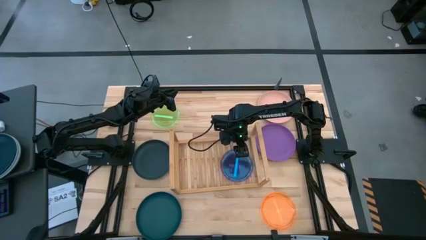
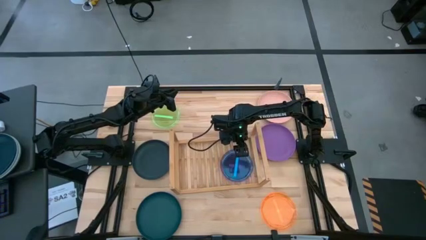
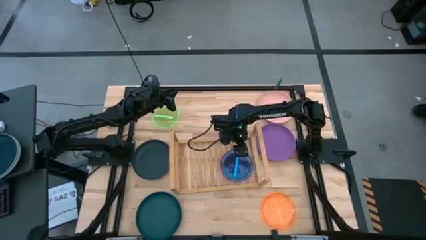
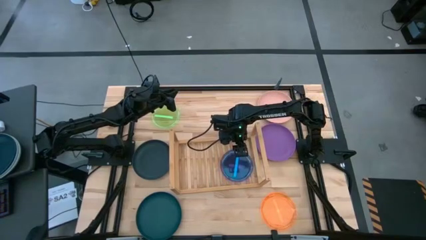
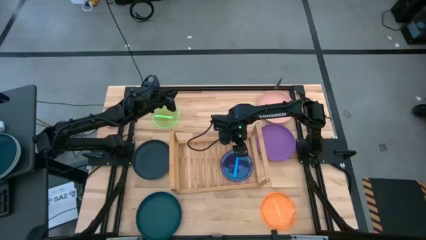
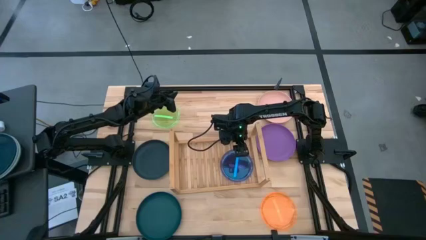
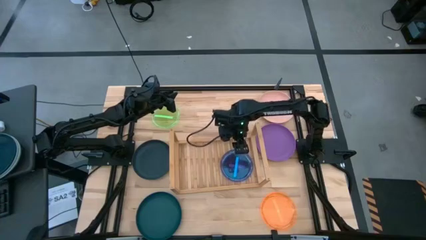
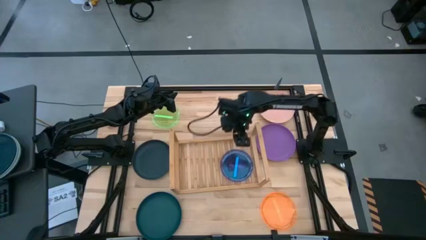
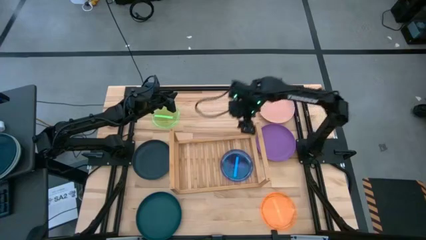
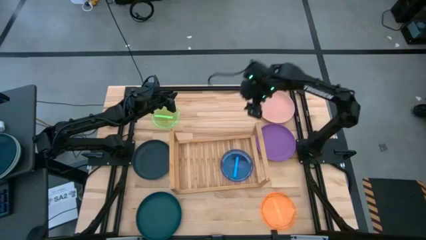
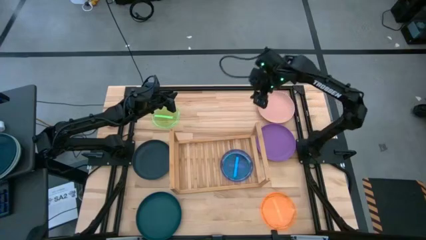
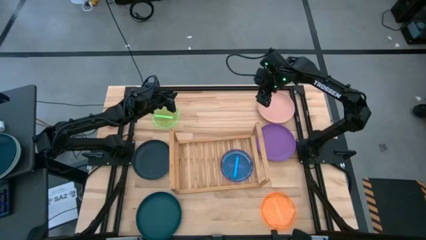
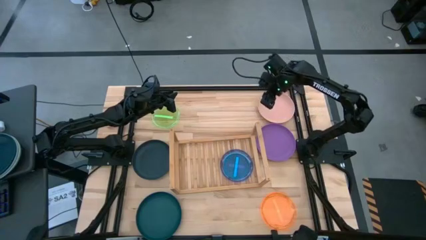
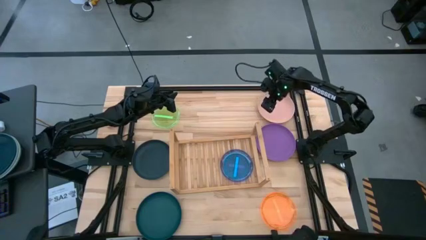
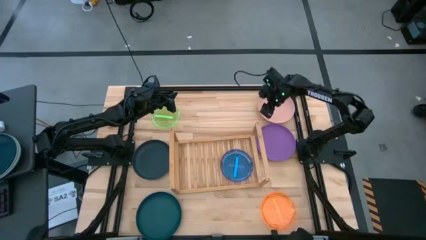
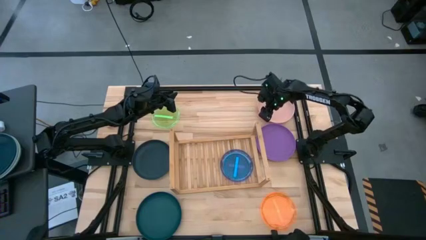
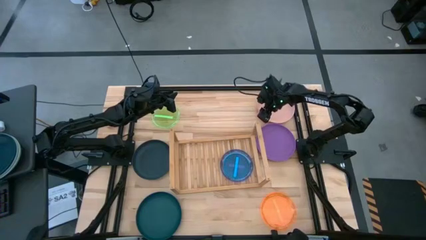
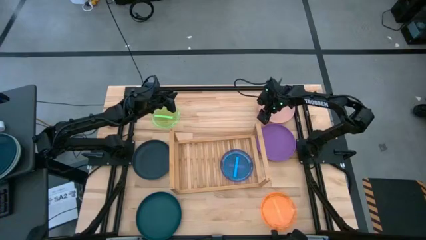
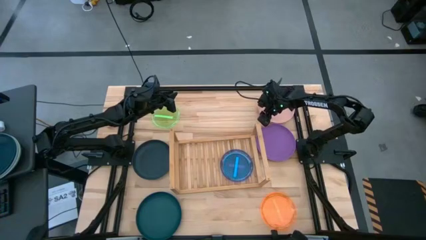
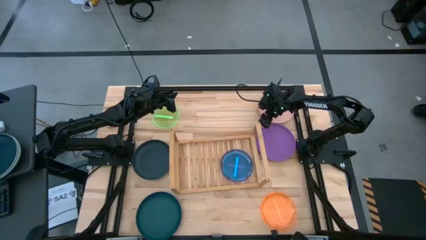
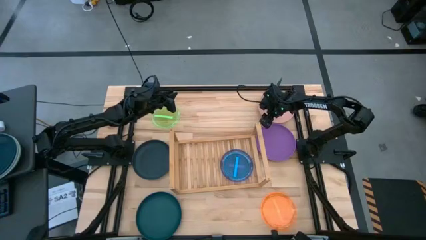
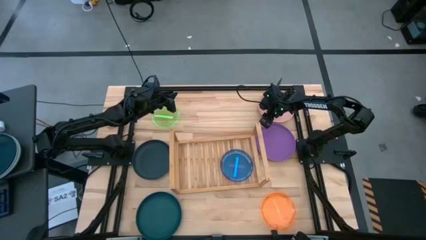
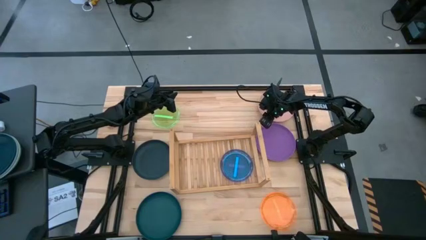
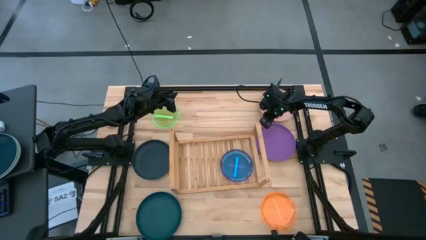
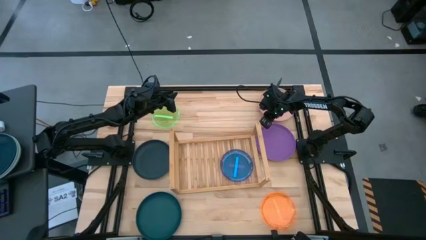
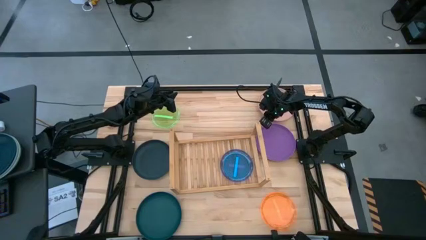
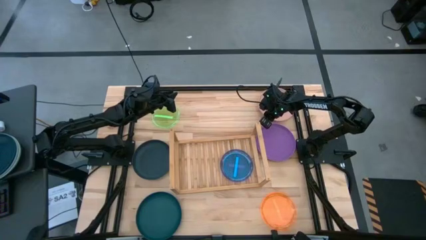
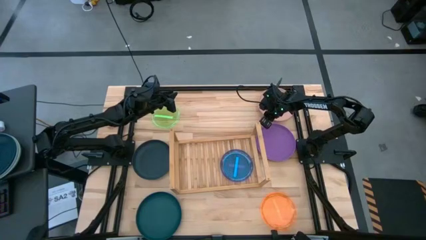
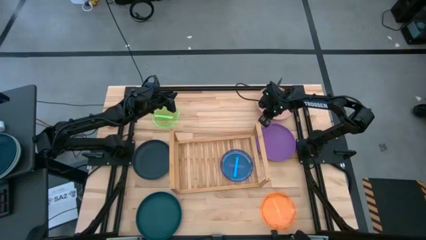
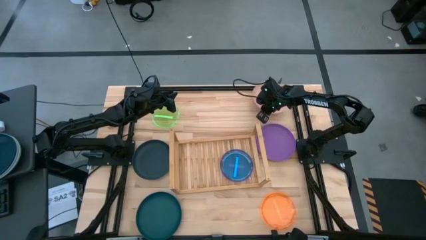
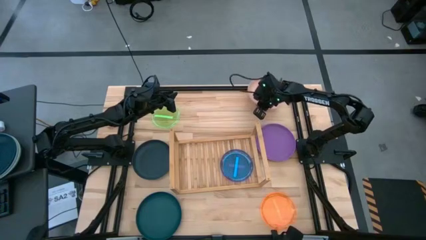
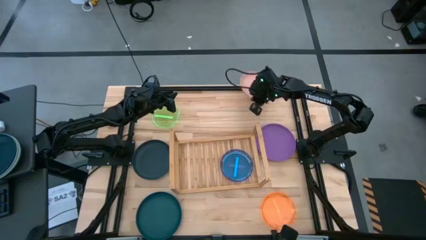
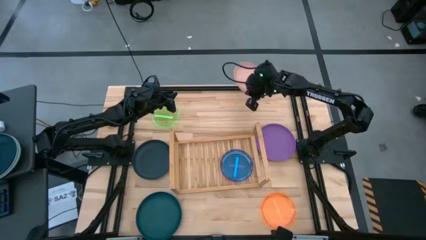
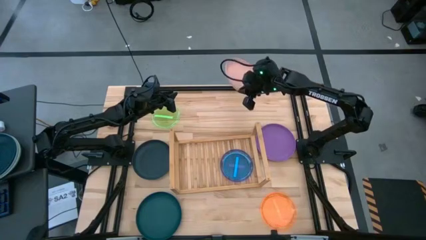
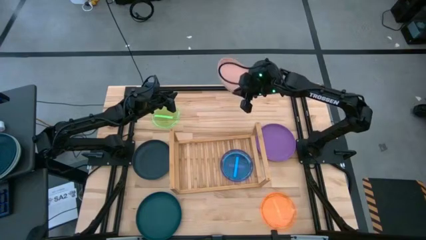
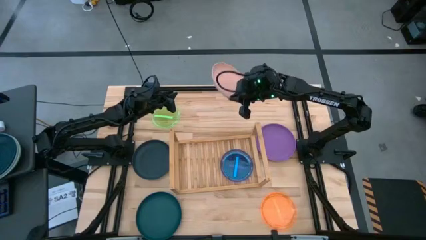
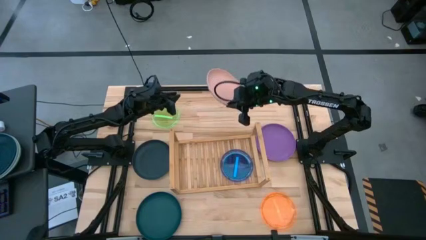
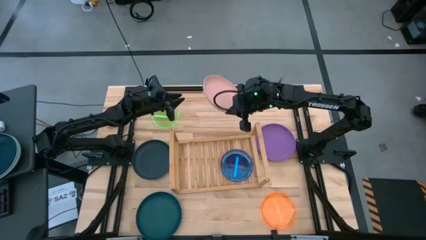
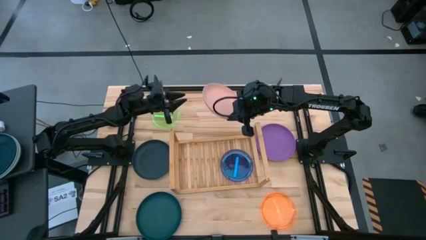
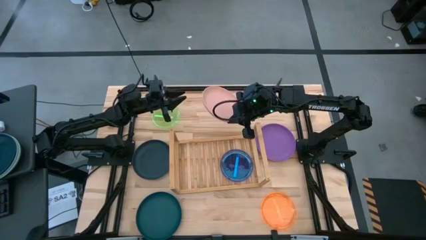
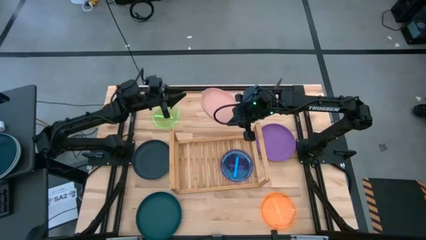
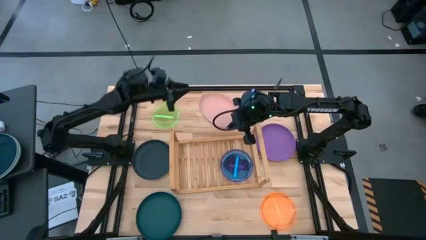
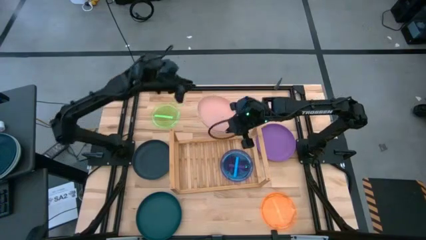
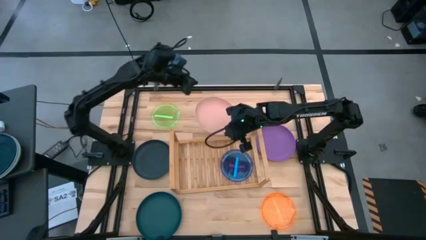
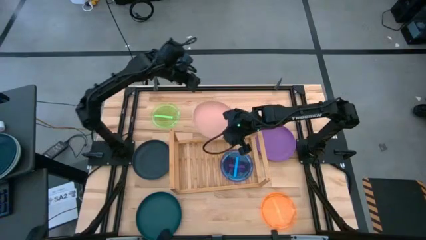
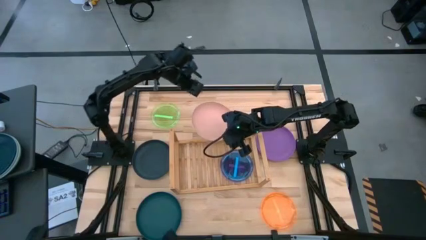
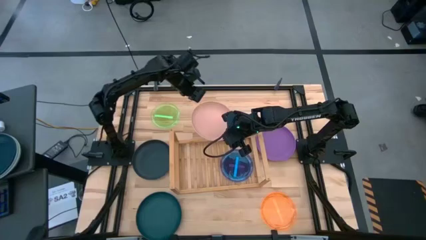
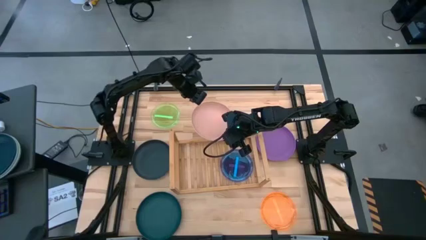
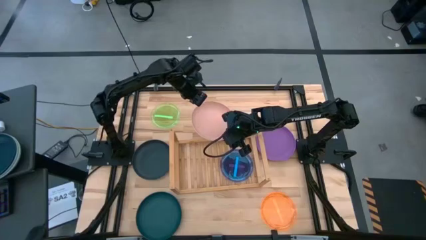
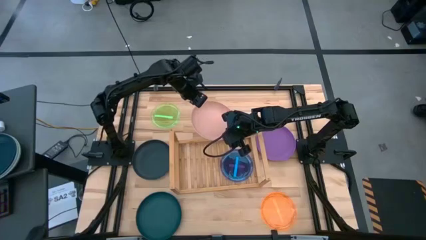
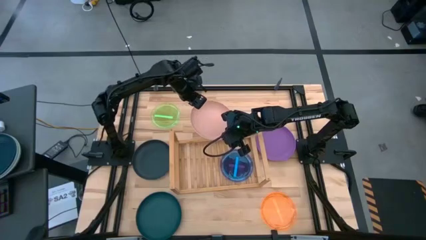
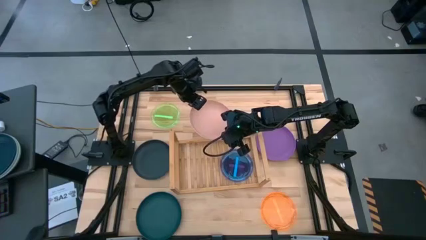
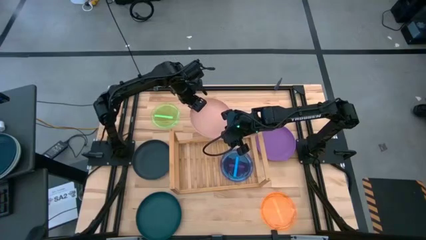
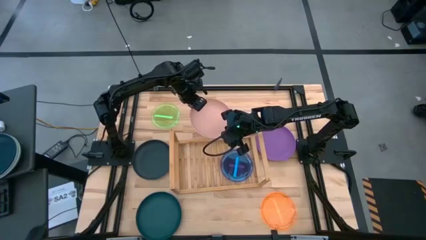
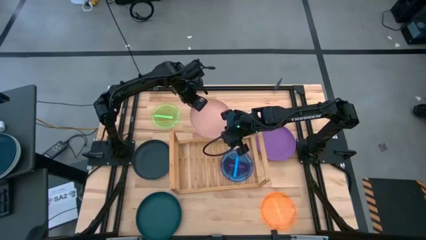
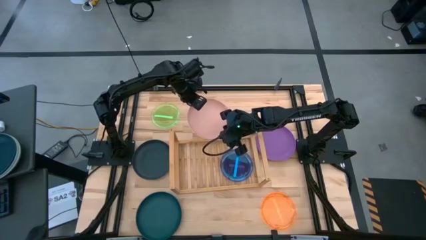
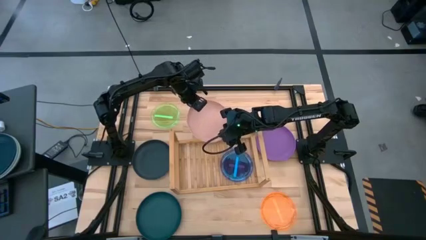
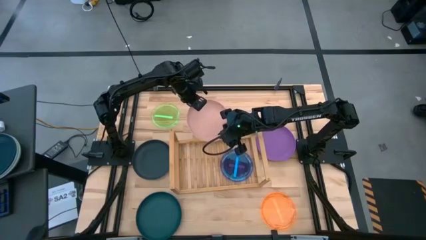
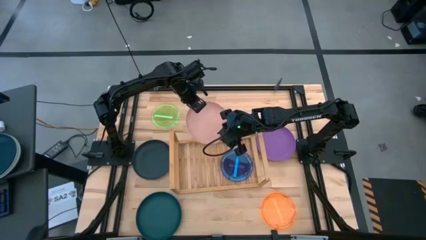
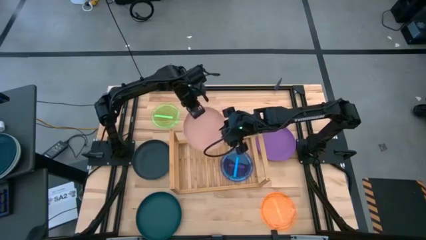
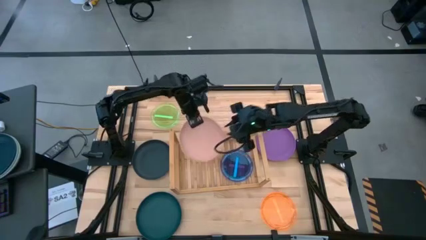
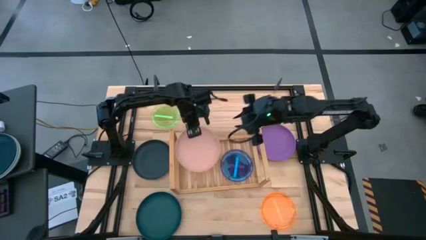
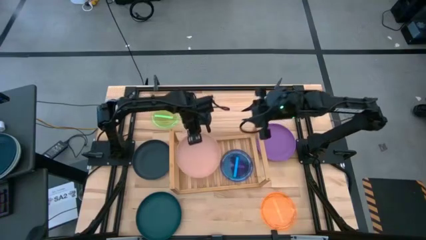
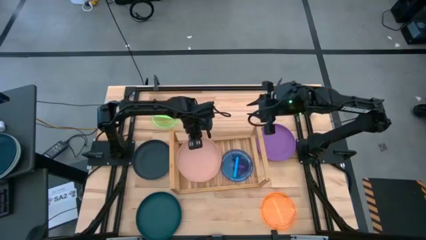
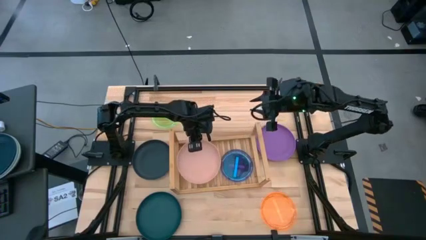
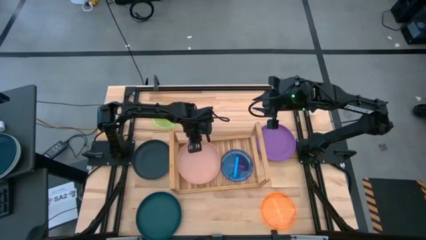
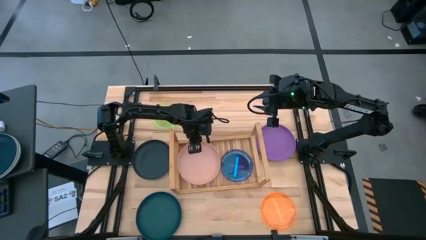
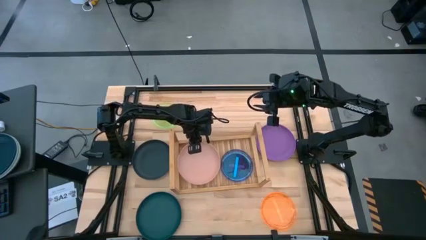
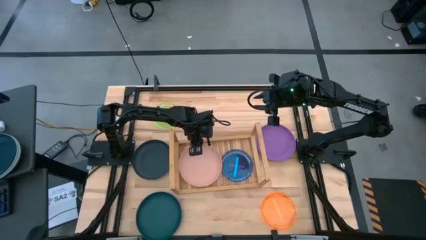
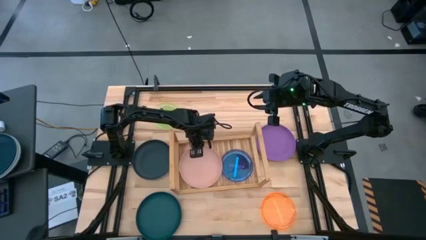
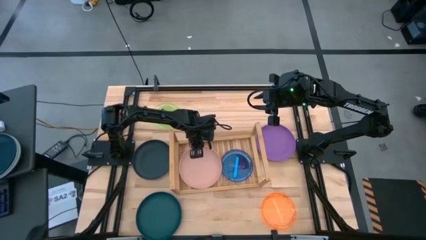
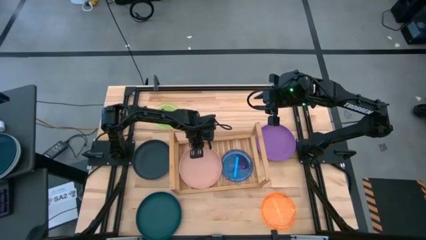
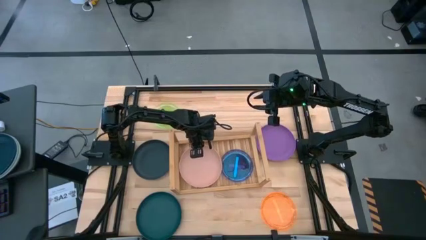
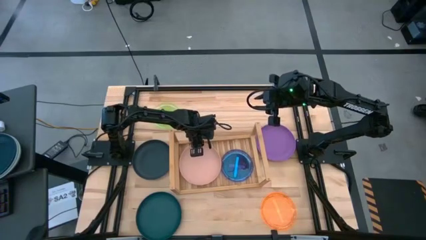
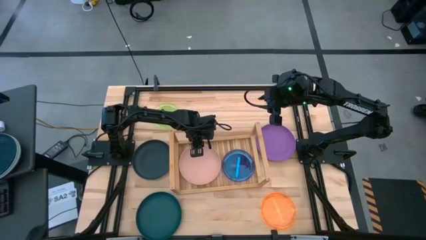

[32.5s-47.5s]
Task: Place and stack plates onto a shelf
Put the pink plate on the shelf
